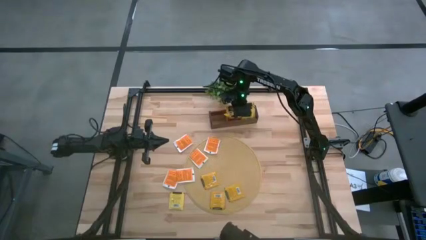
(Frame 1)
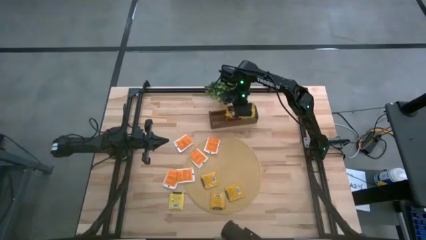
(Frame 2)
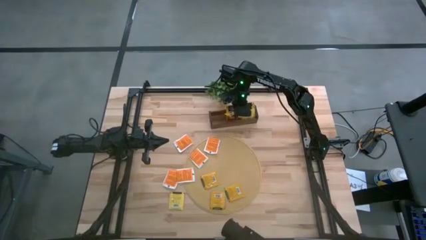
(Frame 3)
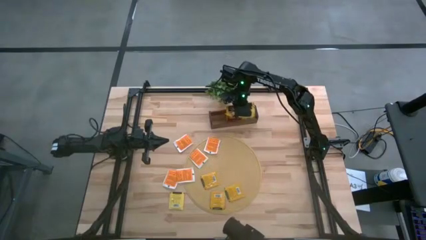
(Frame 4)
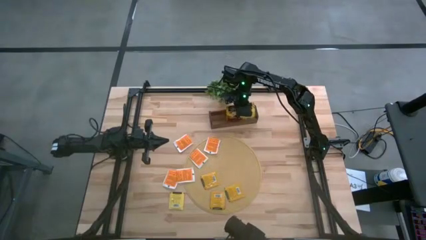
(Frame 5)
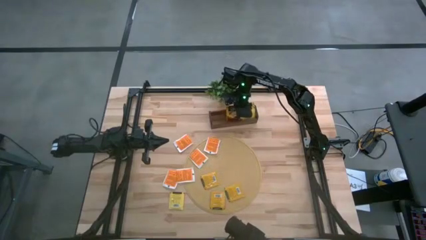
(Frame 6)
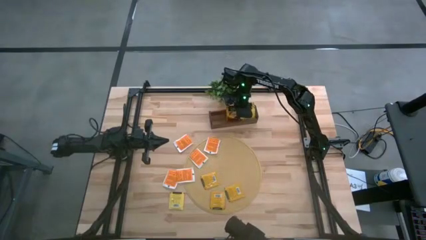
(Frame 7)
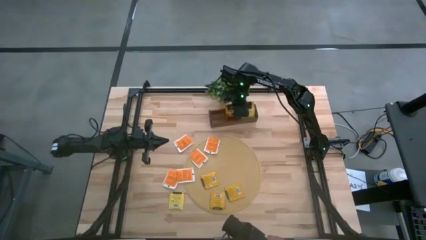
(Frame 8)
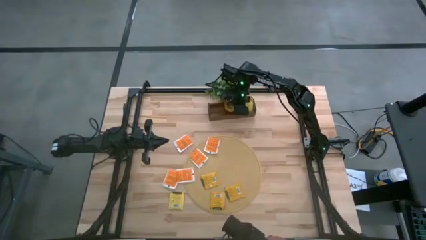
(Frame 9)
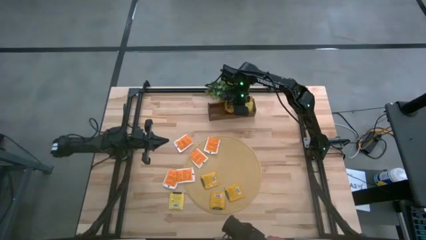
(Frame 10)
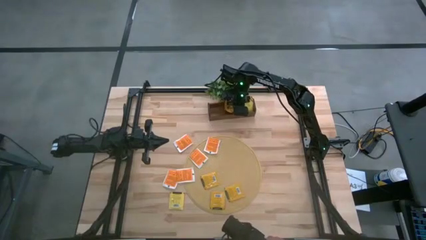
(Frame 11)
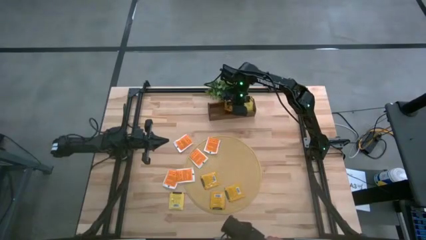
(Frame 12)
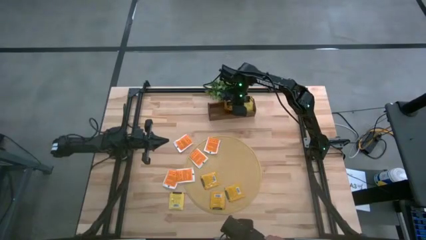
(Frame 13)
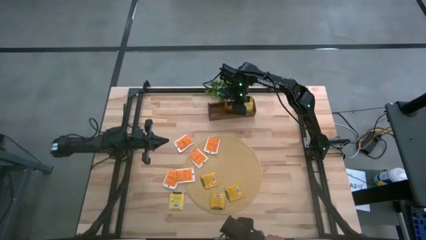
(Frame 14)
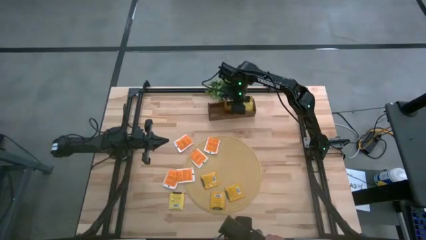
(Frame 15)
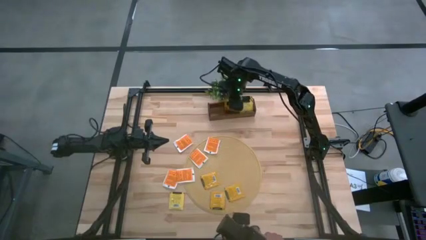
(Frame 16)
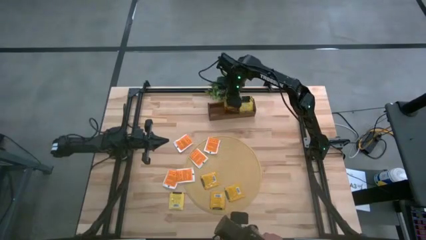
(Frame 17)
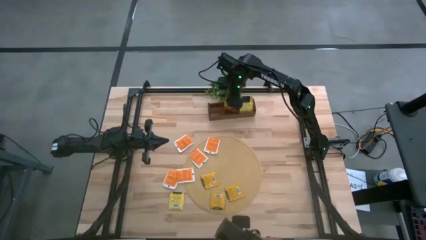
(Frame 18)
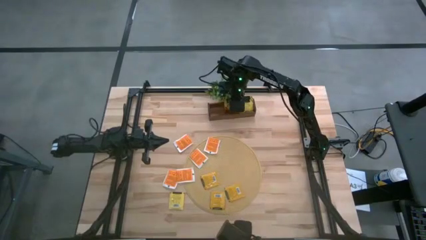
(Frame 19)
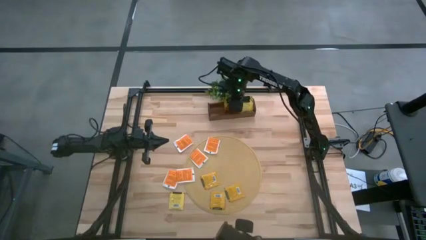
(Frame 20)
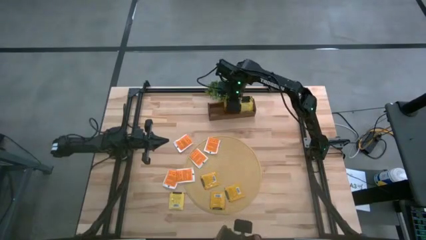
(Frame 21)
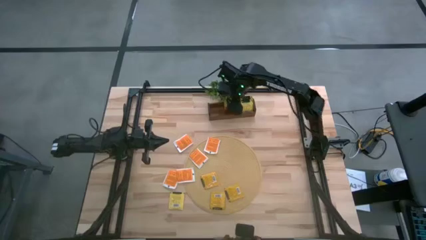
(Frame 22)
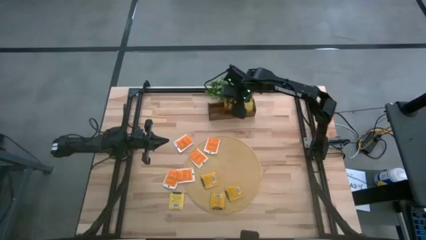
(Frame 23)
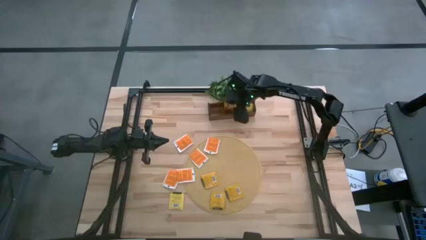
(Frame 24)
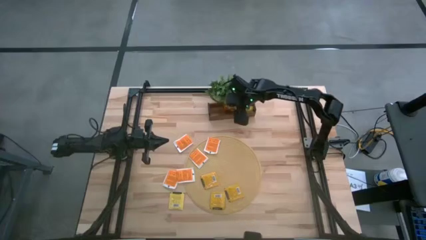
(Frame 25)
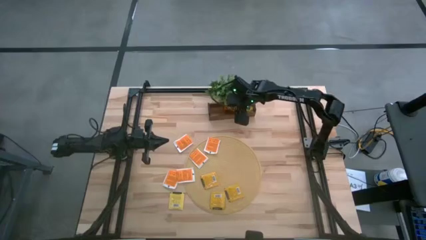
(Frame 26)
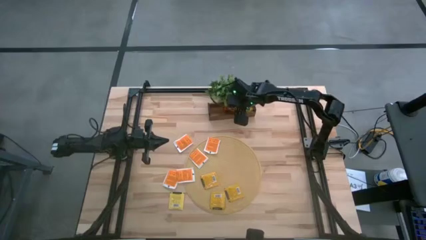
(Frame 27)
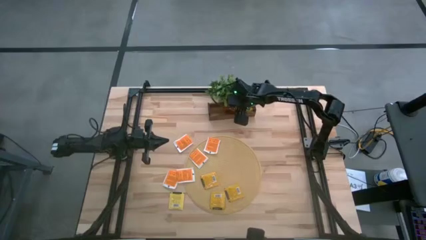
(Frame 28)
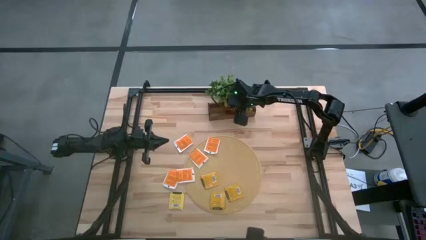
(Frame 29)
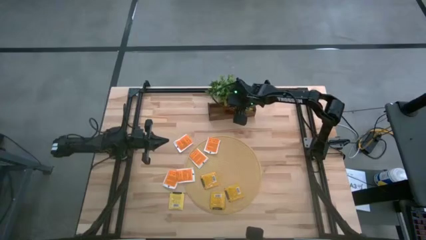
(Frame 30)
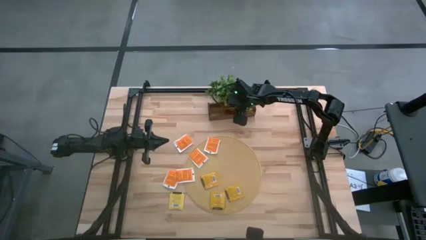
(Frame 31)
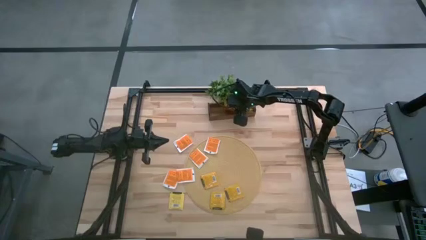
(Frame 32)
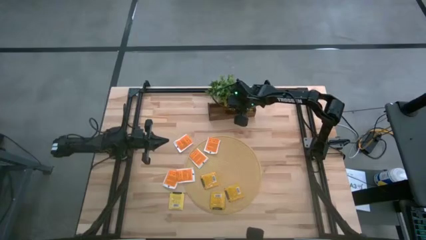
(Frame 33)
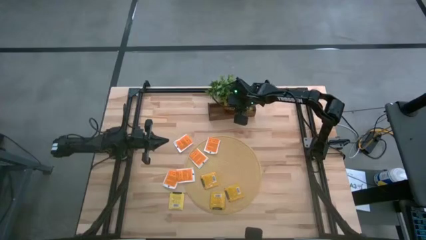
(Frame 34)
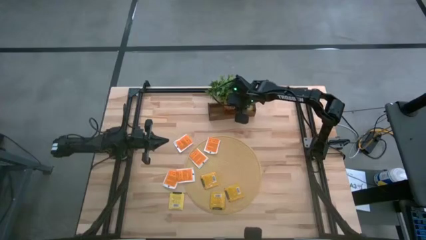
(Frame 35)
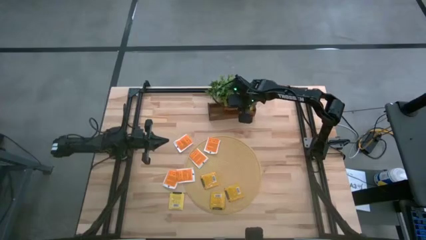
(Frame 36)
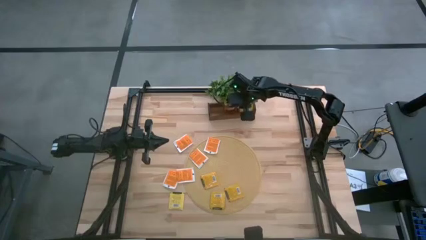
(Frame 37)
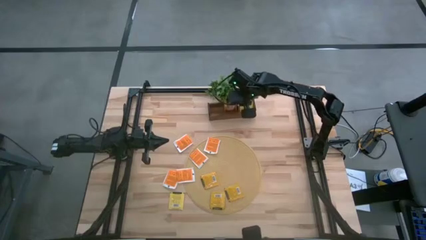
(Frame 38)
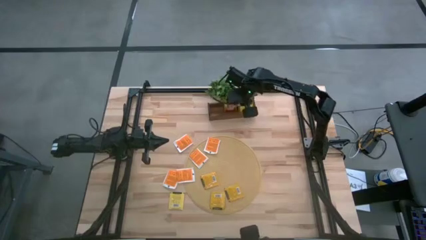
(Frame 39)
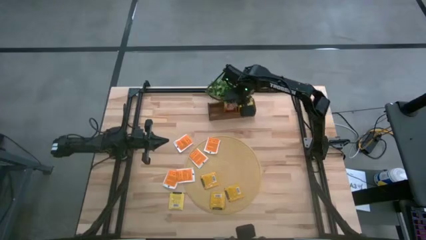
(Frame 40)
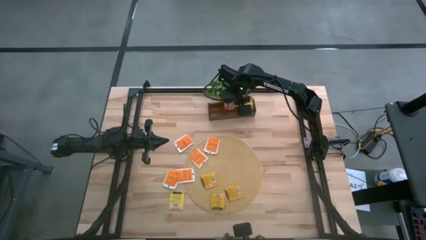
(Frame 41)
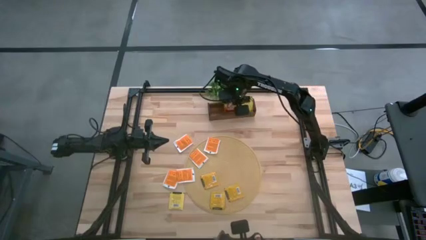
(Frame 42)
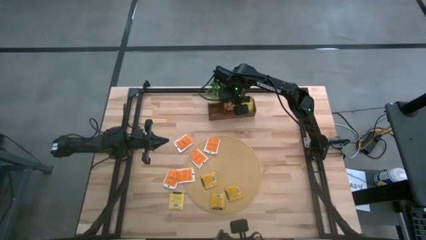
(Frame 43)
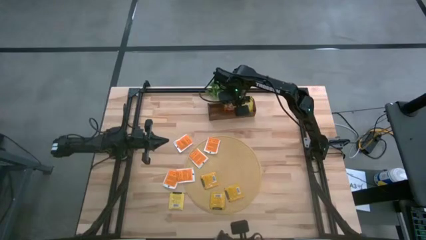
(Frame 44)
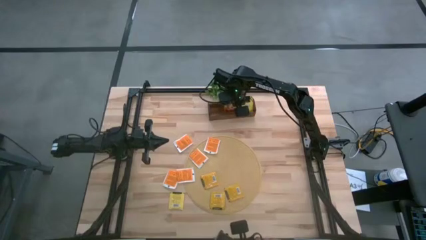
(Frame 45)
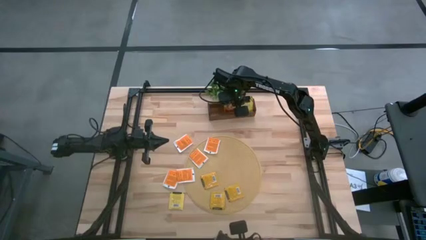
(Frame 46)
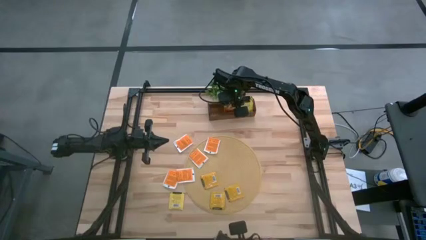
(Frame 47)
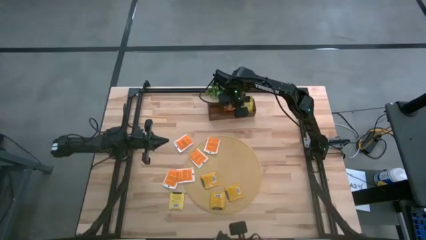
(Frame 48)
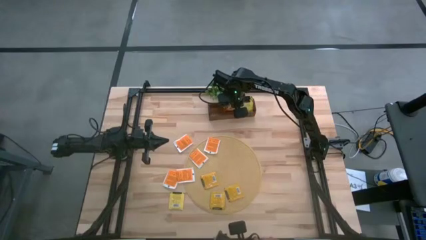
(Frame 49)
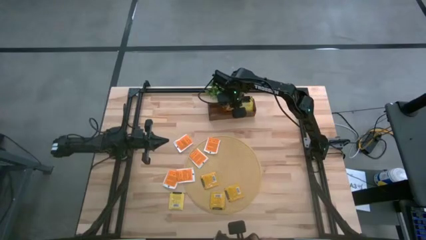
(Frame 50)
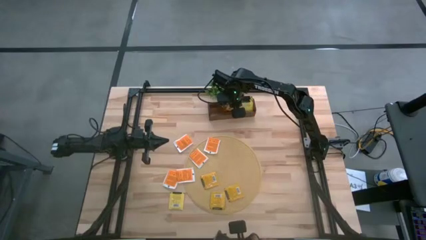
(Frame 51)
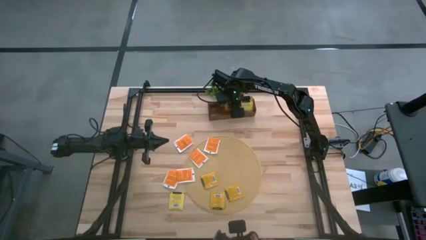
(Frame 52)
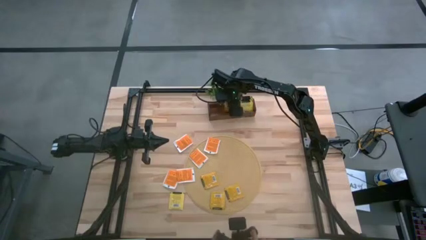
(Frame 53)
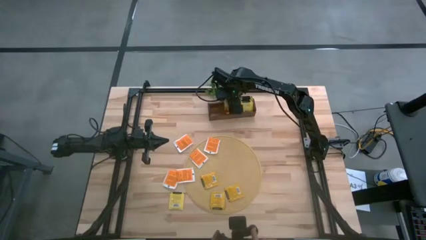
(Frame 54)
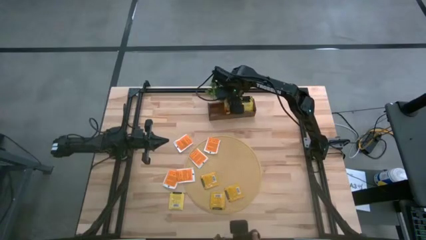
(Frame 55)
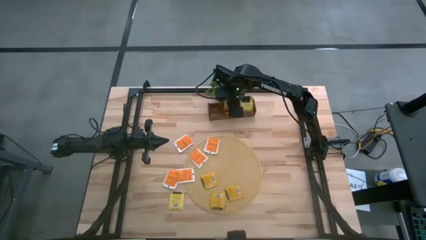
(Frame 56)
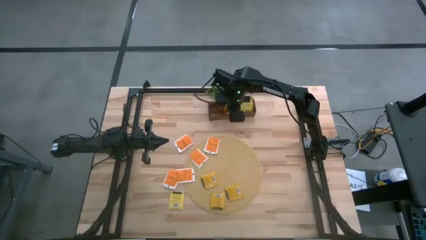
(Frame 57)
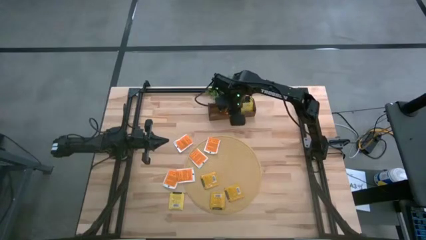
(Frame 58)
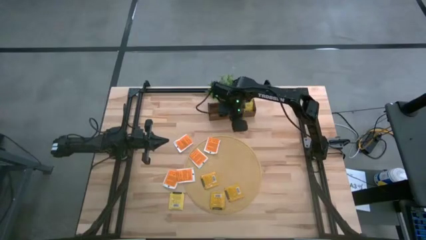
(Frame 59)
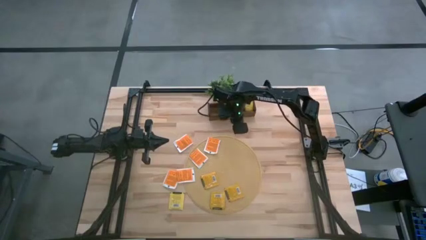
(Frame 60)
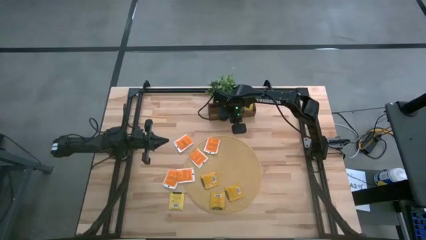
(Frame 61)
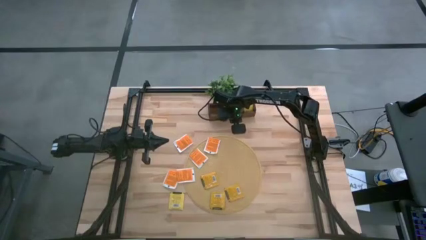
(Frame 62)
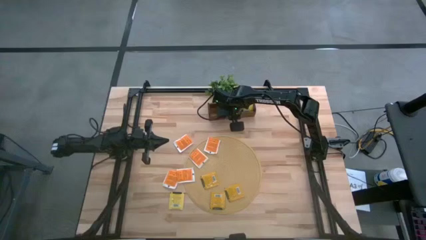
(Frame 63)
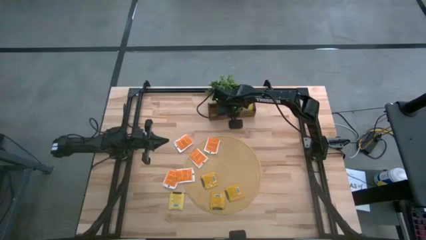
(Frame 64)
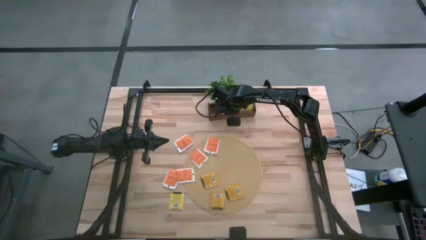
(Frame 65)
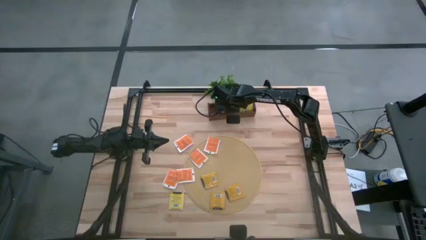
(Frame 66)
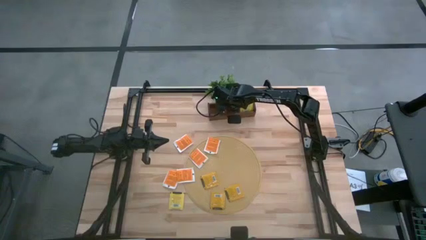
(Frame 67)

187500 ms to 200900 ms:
Task: Pick & Place Tea
Put the orange tea bag into the middle section of the wooden organizer

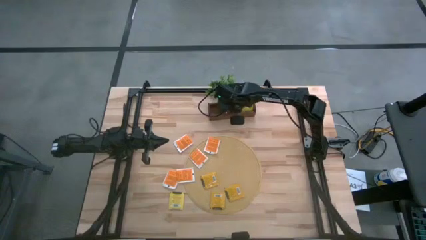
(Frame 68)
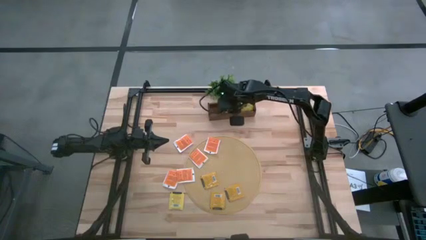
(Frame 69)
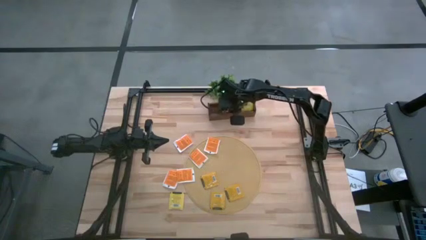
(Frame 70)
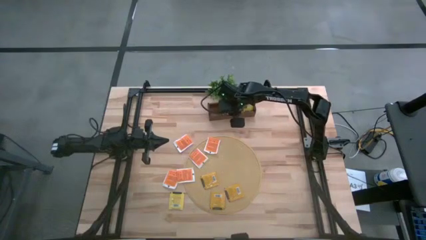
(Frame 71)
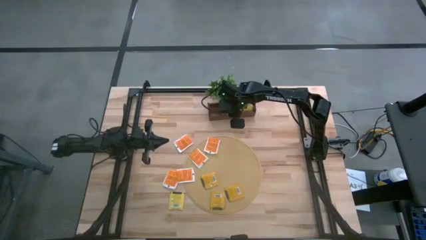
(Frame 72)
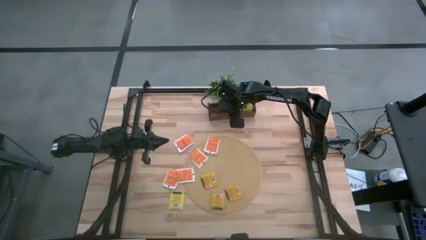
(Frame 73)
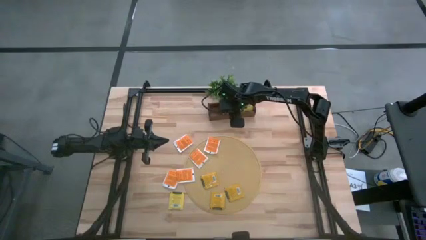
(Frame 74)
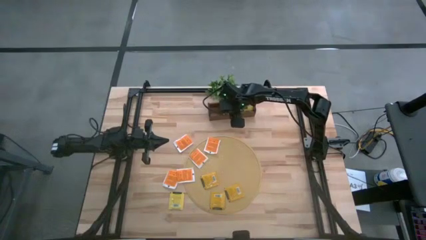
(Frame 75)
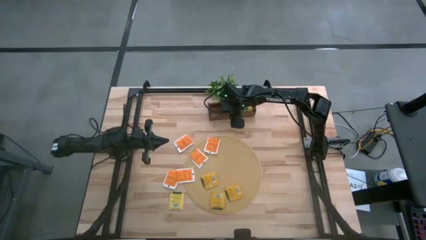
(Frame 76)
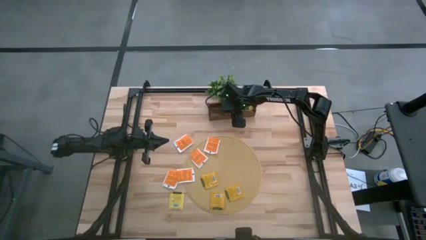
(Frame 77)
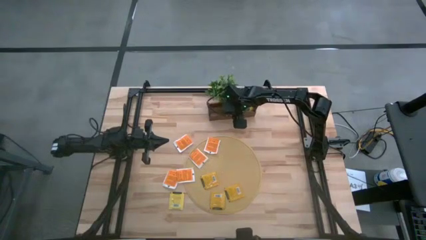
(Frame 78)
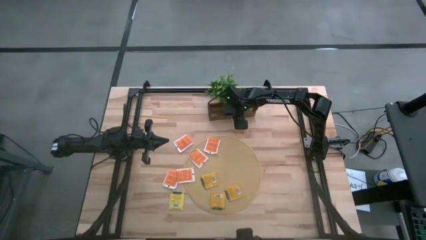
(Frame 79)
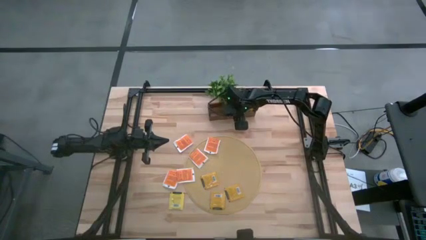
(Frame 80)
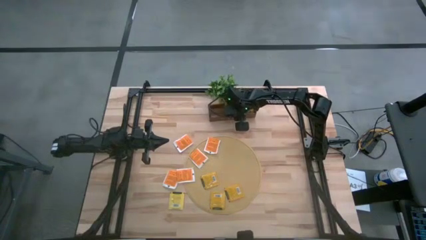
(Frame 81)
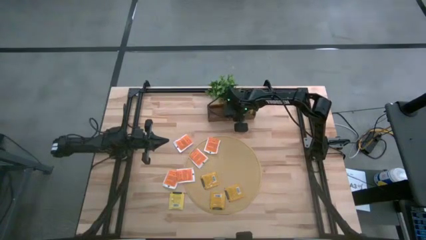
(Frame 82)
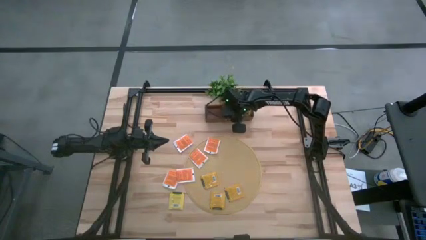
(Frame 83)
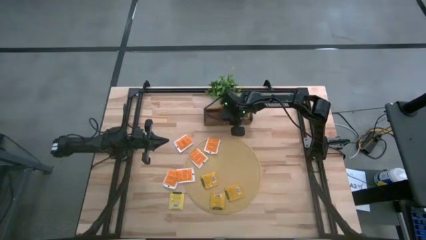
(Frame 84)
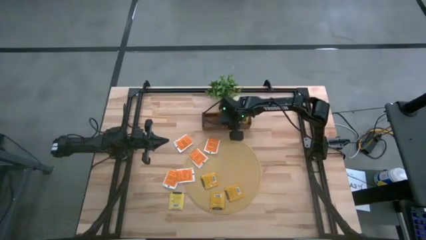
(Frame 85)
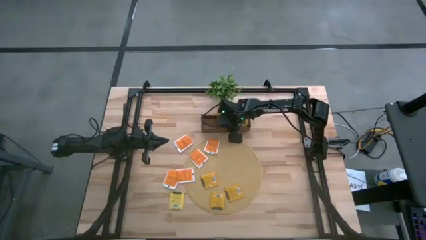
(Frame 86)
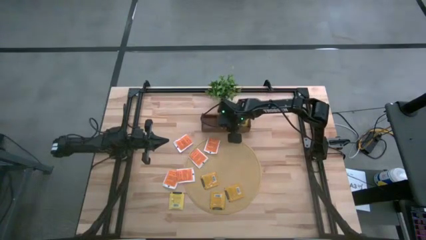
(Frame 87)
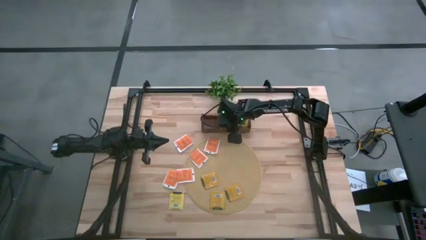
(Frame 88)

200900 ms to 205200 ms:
Adjust the wooden organizer
